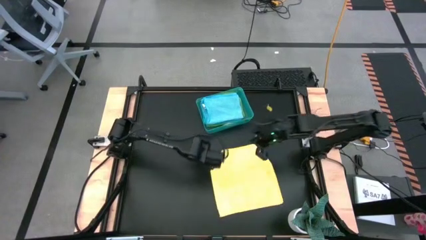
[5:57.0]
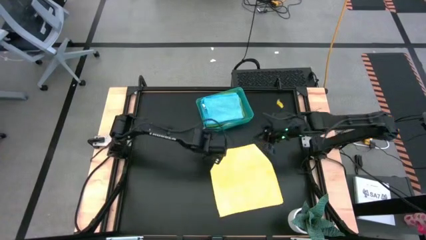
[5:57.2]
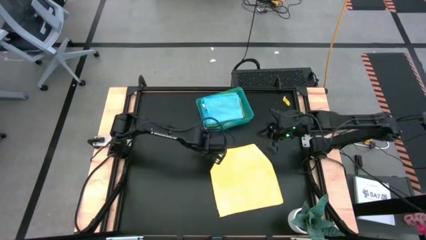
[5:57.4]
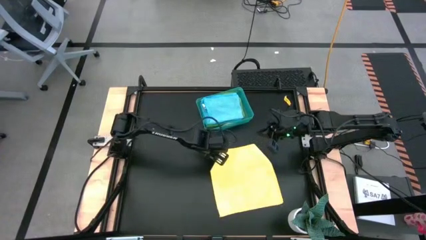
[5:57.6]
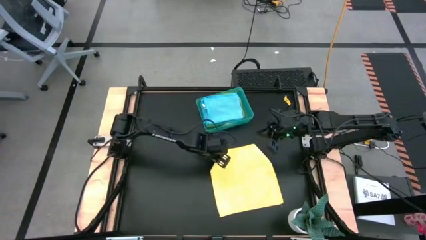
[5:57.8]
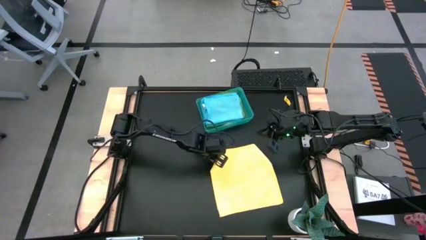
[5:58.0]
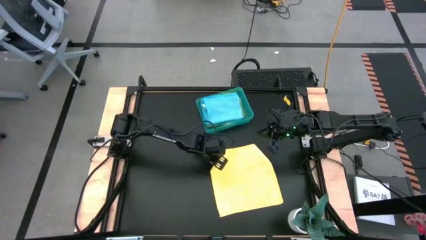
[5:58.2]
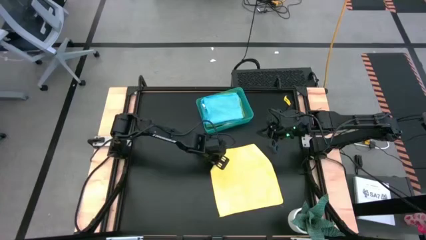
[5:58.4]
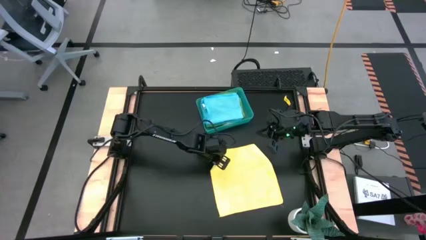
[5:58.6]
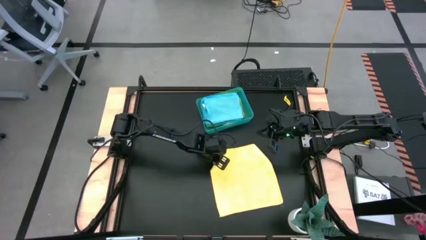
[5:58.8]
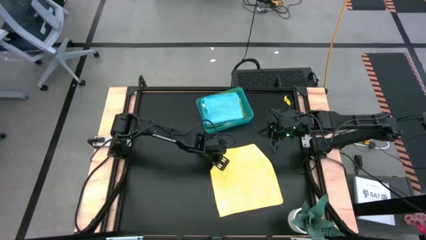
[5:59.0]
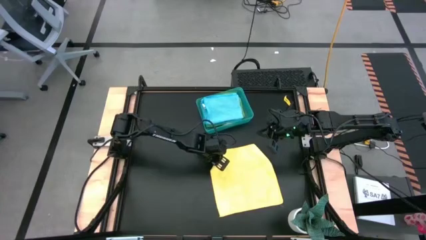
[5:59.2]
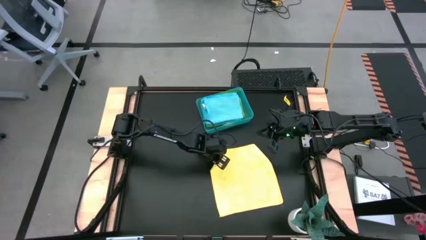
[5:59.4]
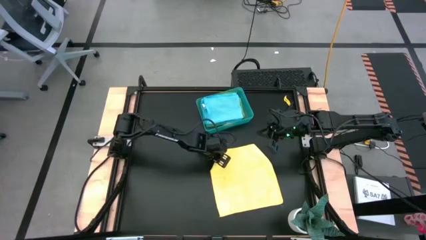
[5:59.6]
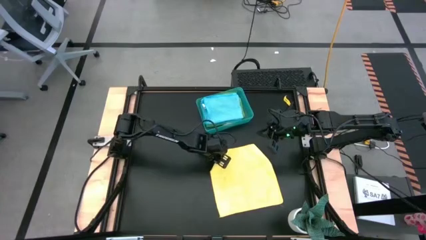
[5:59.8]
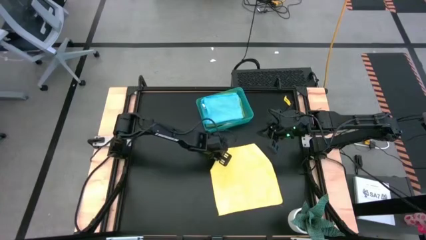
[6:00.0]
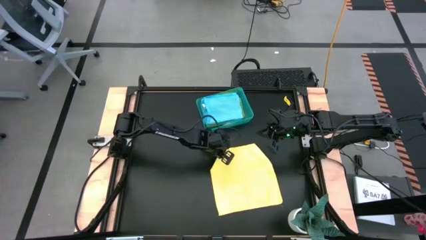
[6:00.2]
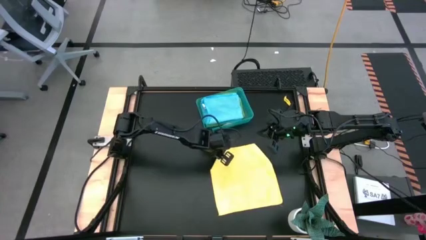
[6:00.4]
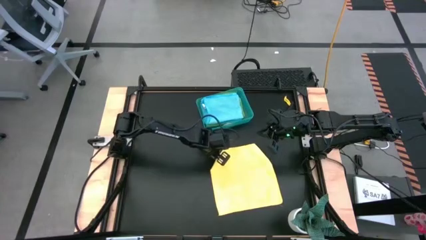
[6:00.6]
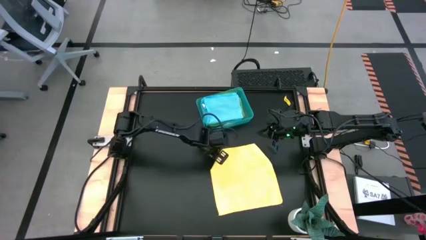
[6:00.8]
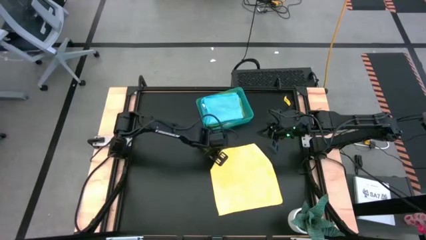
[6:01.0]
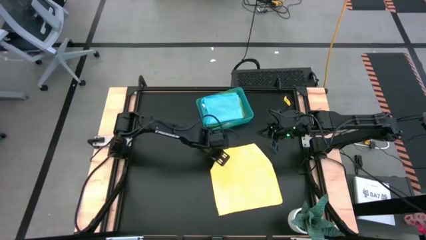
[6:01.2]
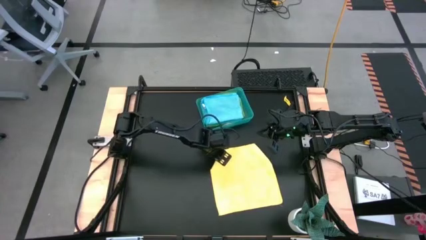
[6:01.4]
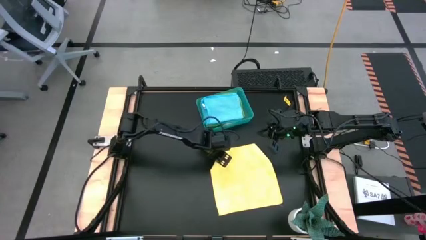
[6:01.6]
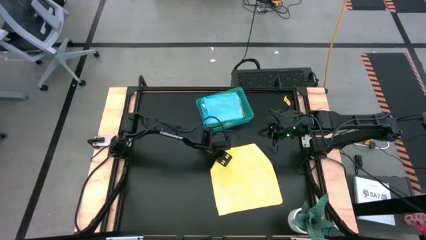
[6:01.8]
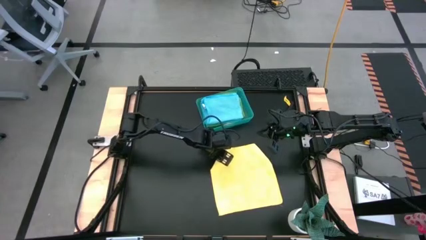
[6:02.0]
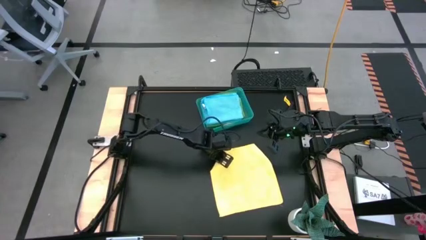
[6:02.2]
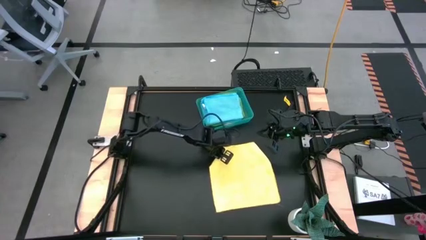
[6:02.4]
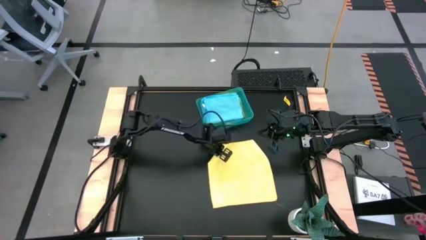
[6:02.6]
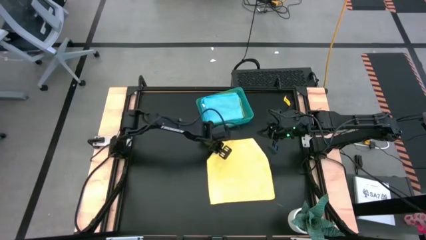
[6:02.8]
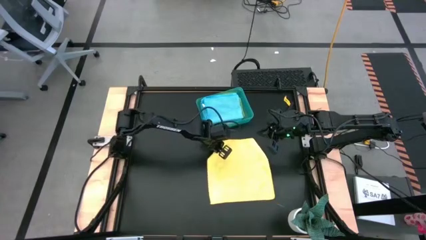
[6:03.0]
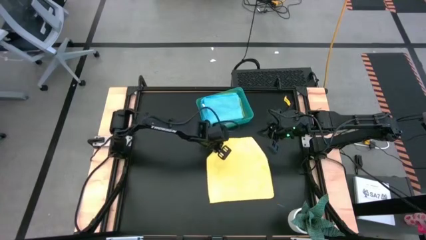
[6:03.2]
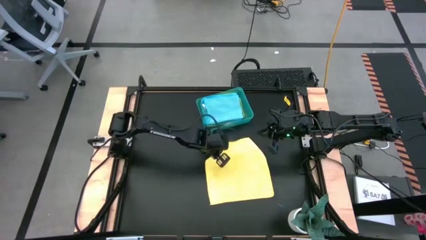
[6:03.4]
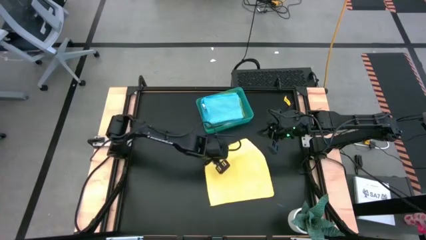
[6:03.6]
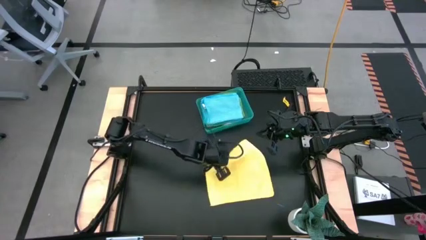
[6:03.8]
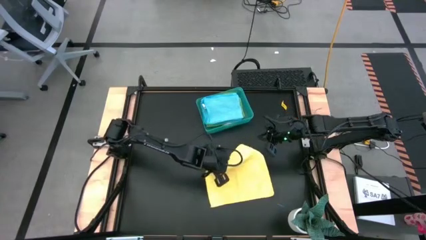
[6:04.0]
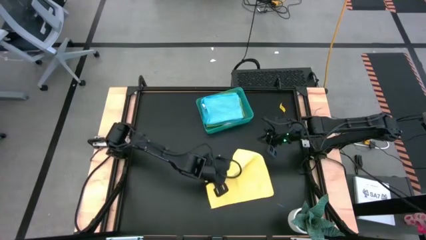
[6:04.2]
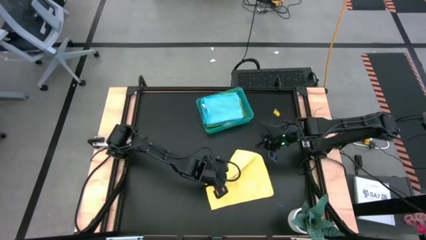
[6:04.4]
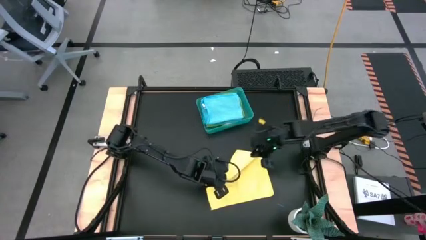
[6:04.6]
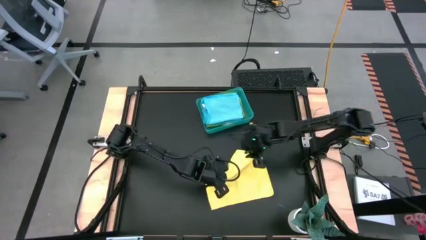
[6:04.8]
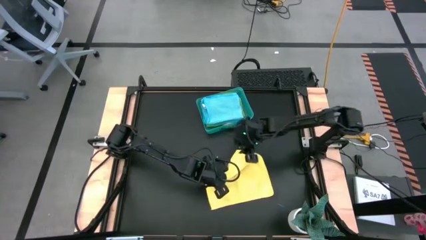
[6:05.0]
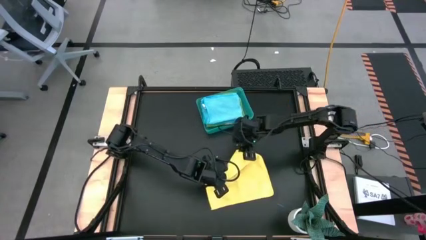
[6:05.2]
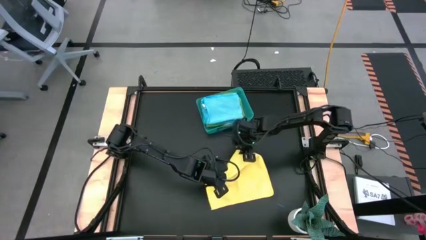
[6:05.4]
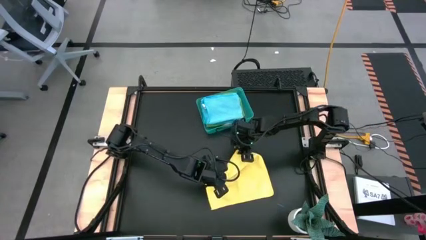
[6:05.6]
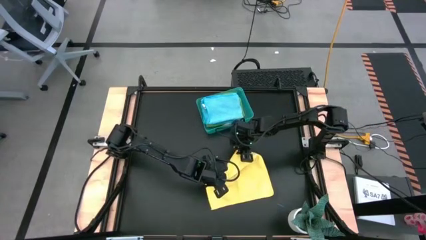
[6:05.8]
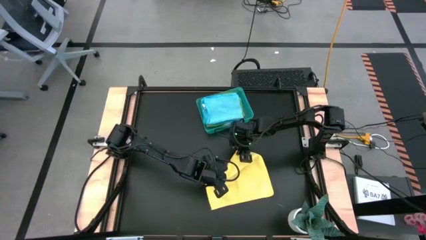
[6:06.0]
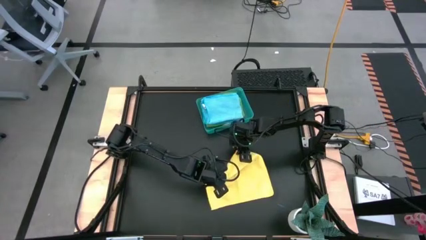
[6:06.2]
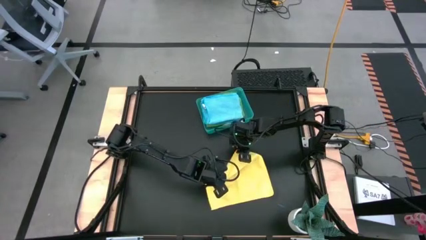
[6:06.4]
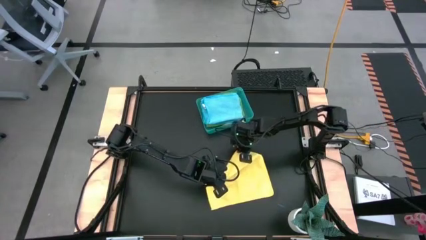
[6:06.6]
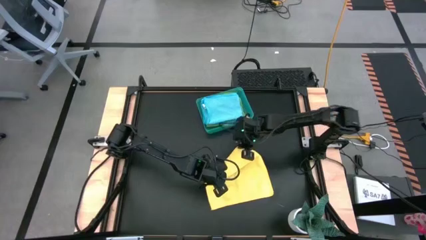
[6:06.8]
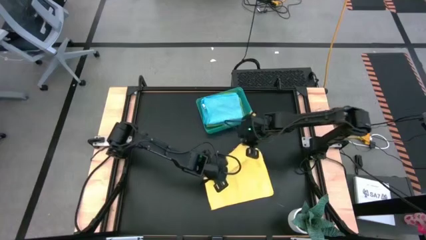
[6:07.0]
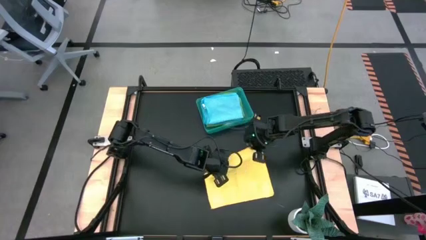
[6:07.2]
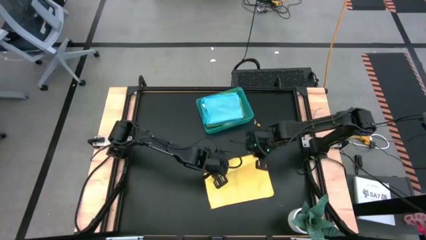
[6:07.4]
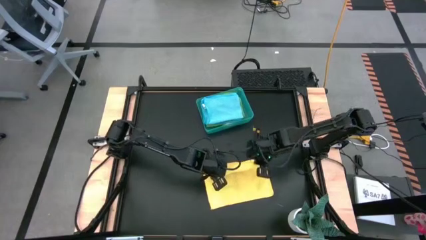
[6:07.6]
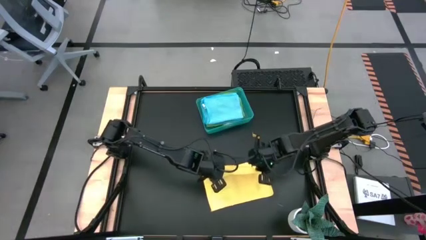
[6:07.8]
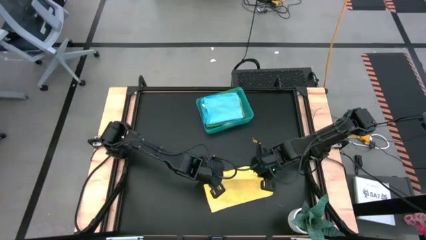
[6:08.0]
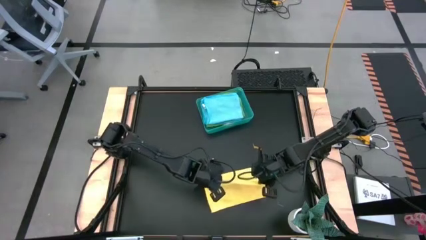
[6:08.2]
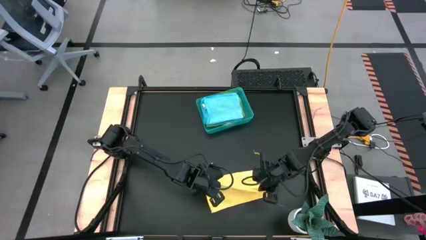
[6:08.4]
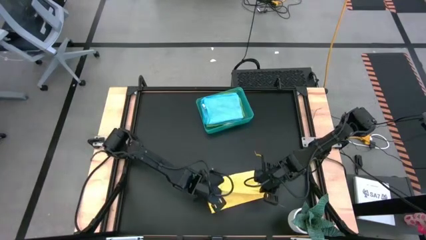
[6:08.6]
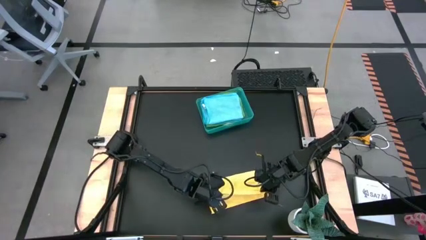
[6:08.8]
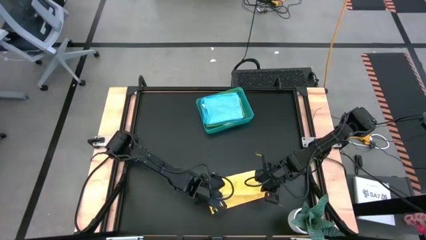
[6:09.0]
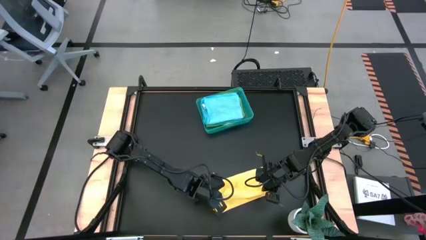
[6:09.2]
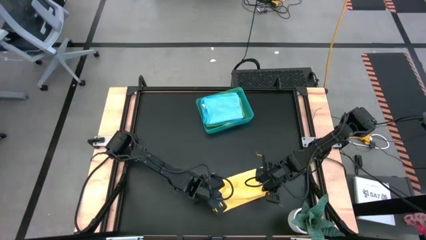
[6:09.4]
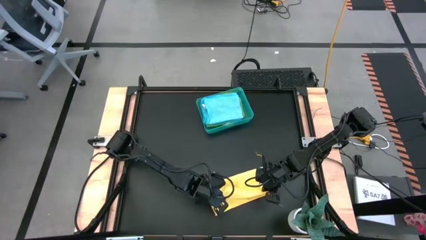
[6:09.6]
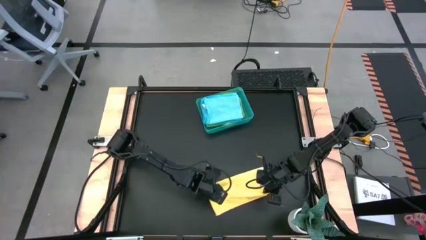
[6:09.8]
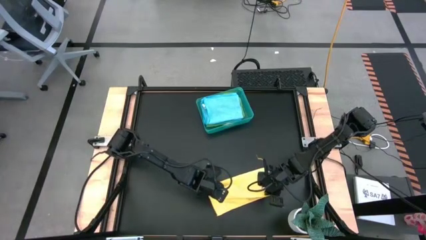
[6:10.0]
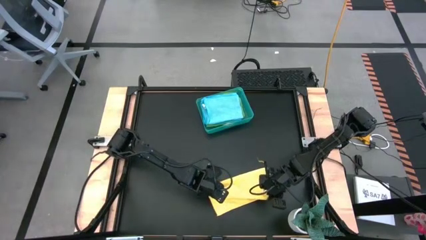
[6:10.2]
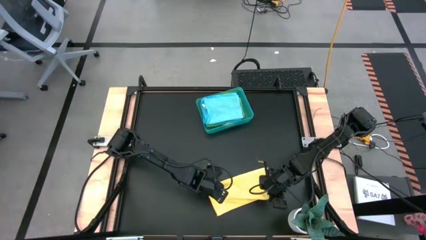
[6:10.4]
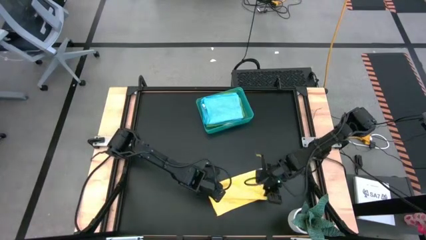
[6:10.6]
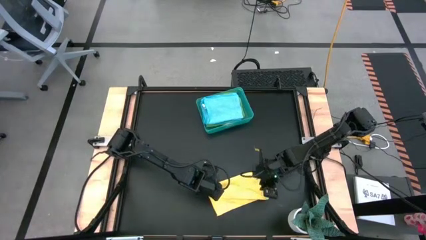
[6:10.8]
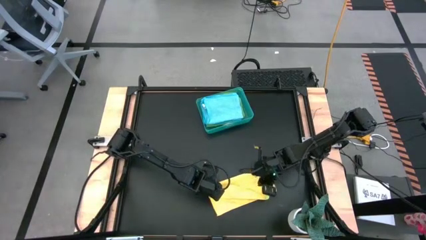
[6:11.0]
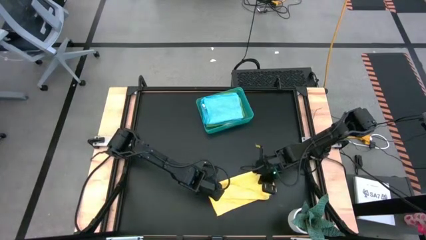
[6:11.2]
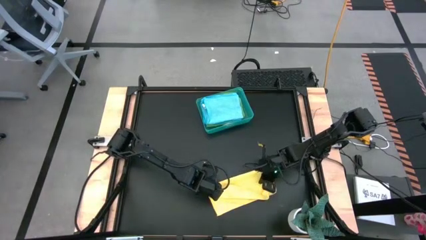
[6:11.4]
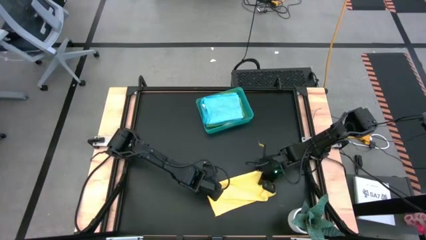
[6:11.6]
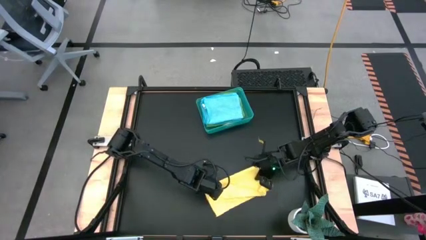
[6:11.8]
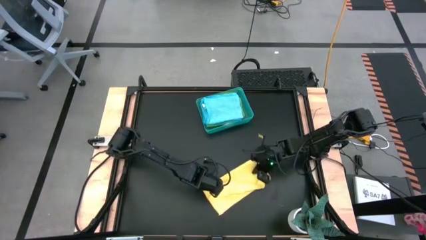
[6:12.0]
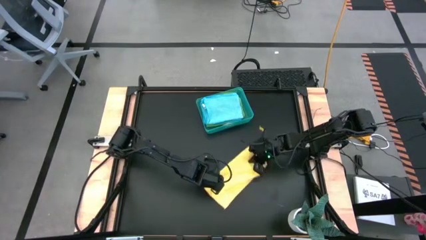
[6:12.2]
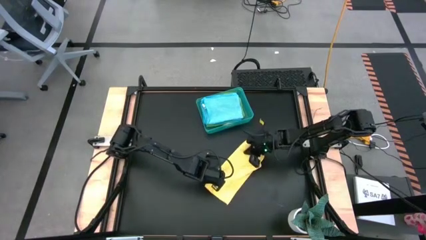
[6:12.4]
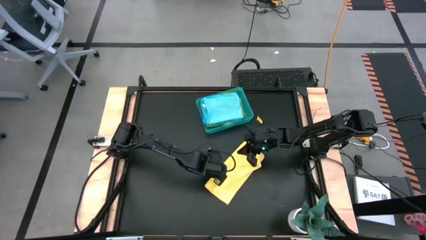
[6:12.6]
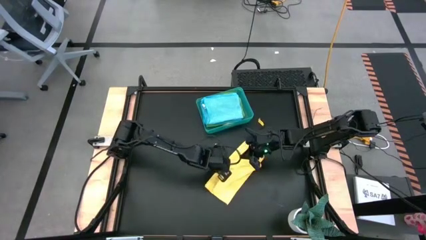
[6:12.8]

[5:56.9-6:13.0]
Task: Fold microfiber towels
Fold the yellow microfiber towel
